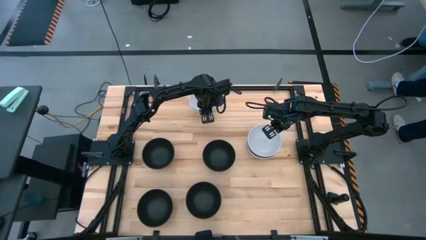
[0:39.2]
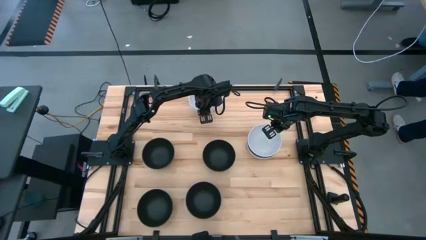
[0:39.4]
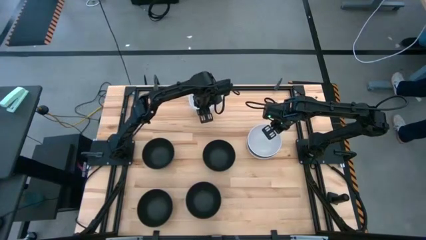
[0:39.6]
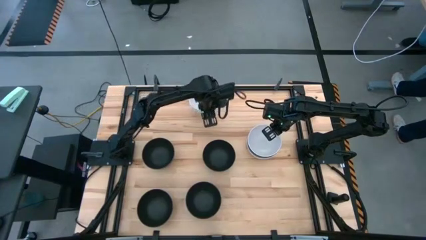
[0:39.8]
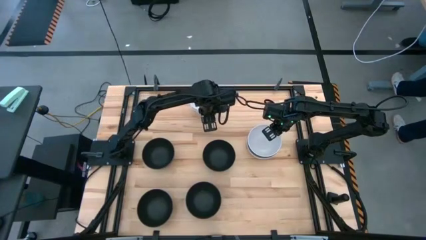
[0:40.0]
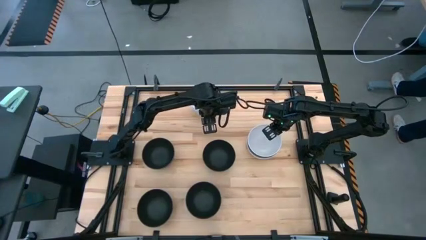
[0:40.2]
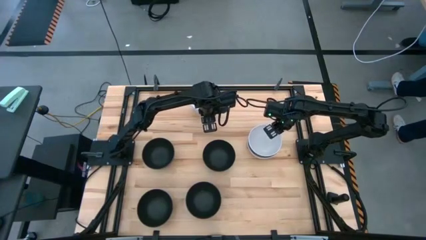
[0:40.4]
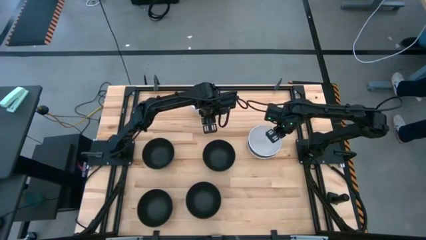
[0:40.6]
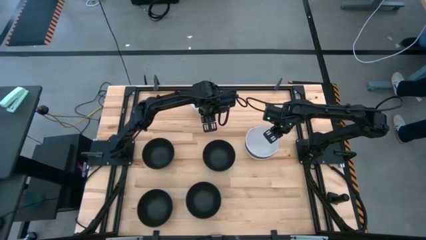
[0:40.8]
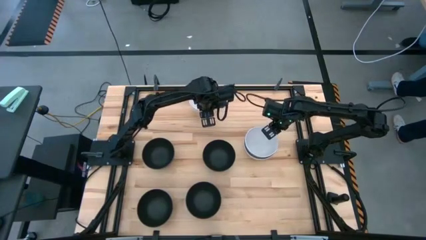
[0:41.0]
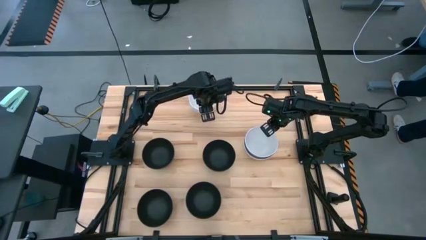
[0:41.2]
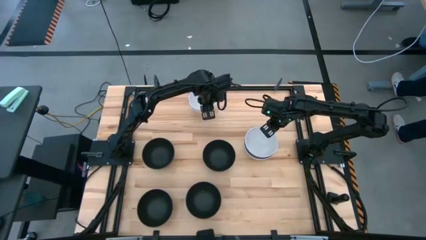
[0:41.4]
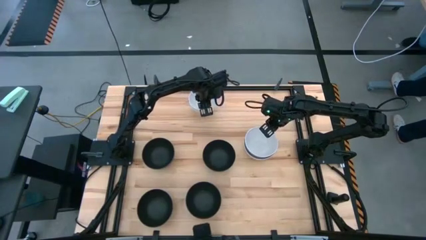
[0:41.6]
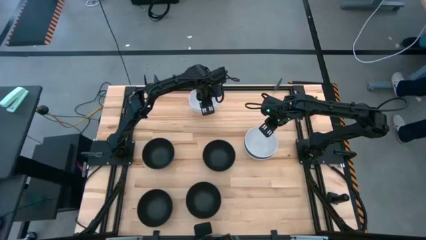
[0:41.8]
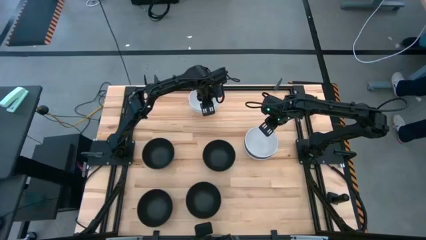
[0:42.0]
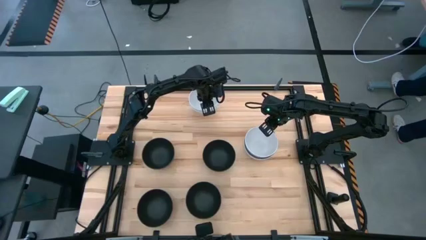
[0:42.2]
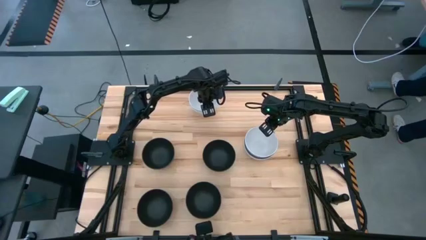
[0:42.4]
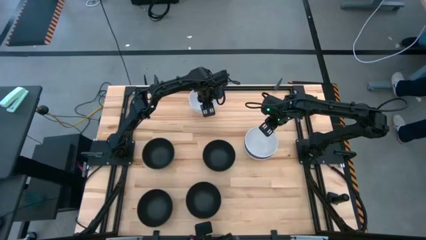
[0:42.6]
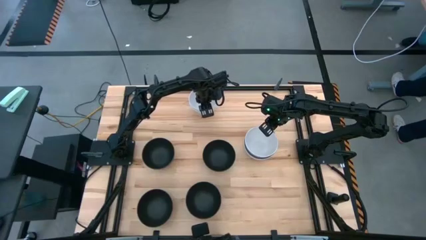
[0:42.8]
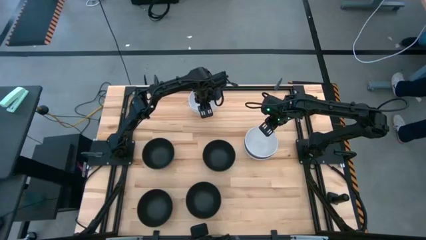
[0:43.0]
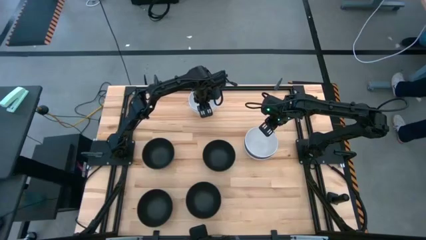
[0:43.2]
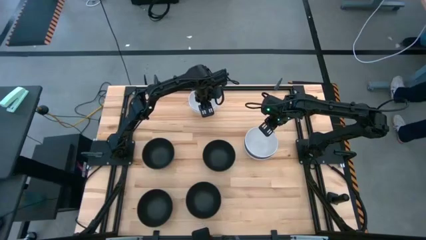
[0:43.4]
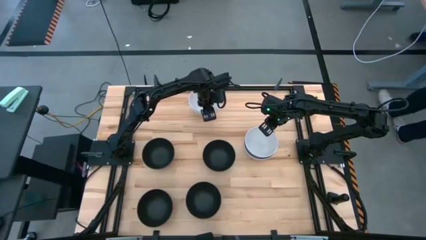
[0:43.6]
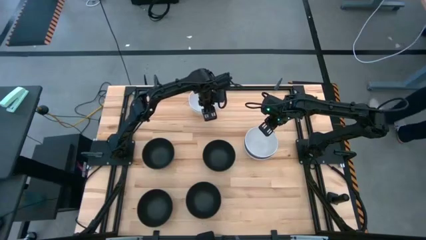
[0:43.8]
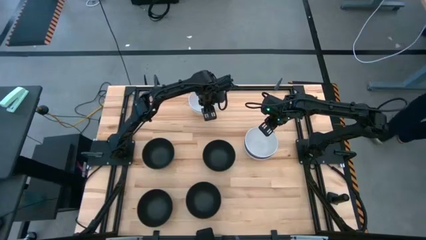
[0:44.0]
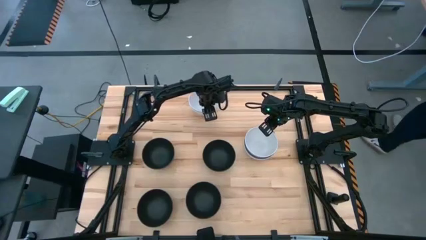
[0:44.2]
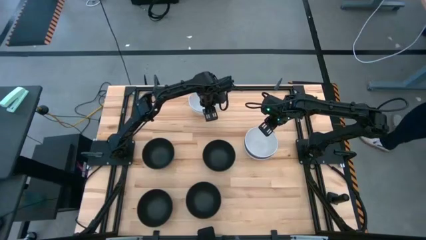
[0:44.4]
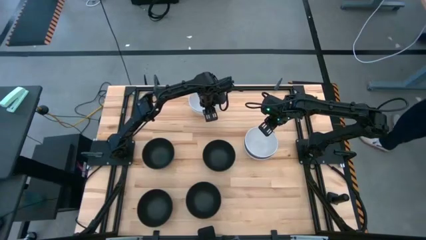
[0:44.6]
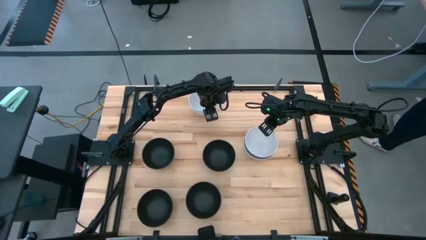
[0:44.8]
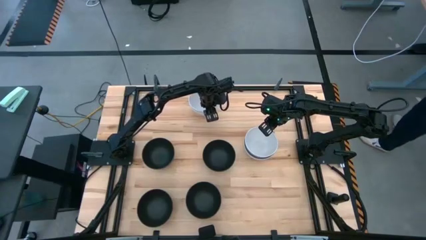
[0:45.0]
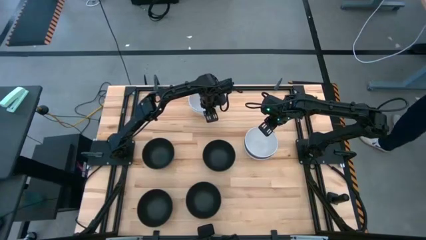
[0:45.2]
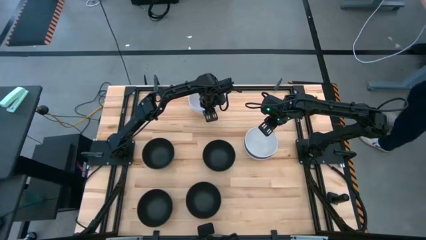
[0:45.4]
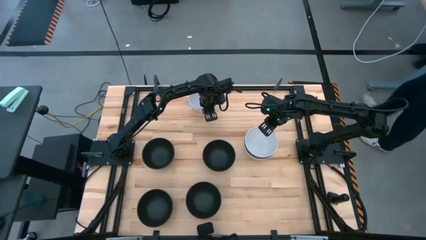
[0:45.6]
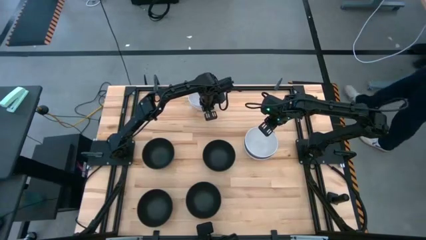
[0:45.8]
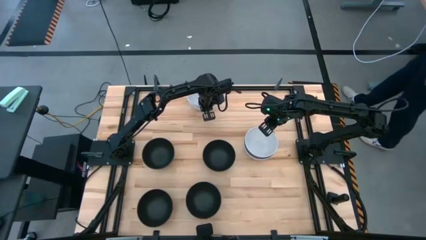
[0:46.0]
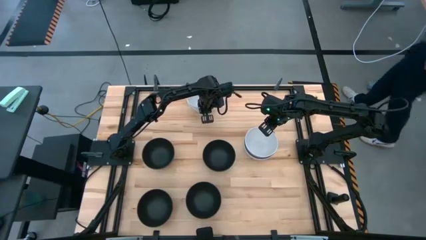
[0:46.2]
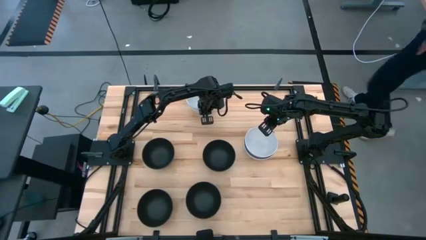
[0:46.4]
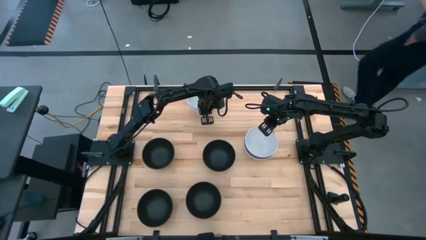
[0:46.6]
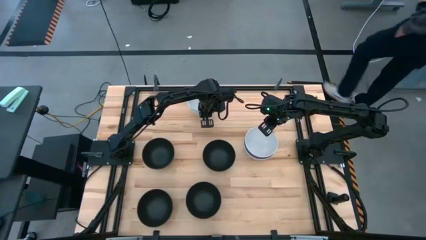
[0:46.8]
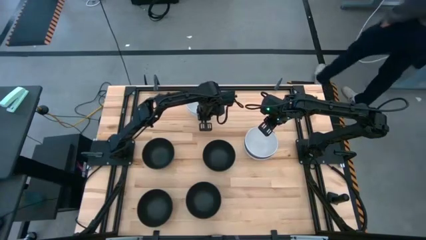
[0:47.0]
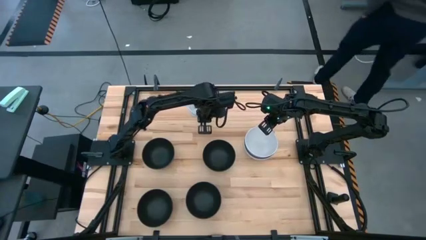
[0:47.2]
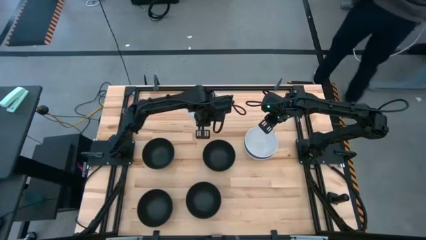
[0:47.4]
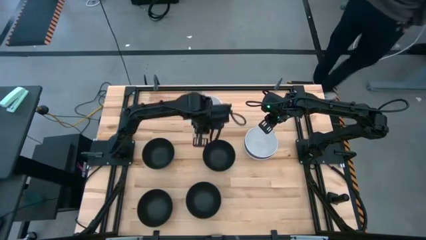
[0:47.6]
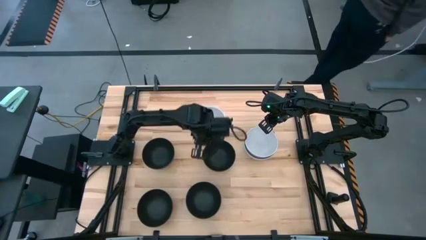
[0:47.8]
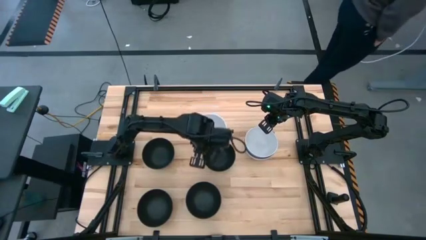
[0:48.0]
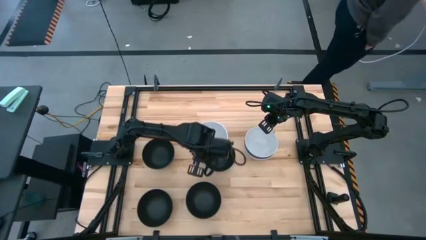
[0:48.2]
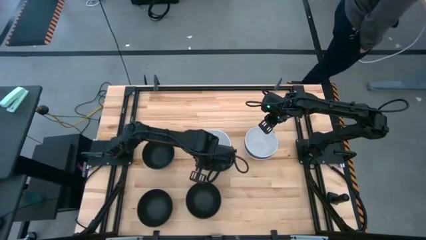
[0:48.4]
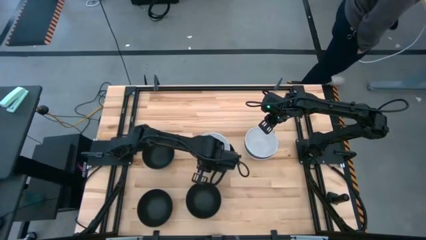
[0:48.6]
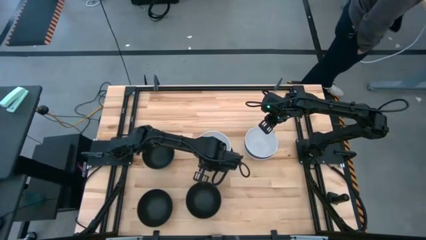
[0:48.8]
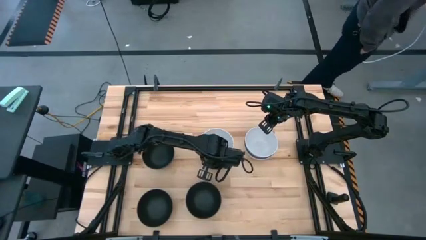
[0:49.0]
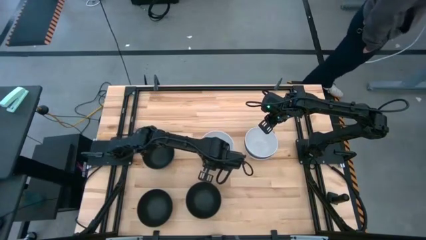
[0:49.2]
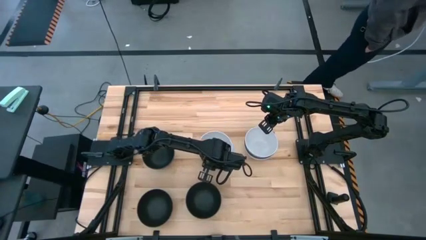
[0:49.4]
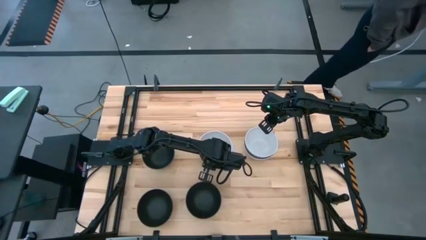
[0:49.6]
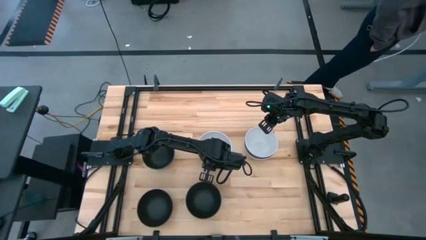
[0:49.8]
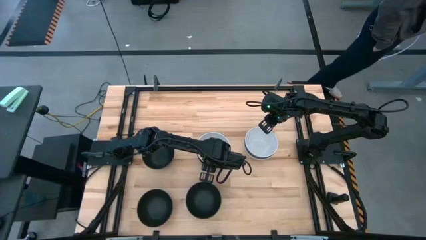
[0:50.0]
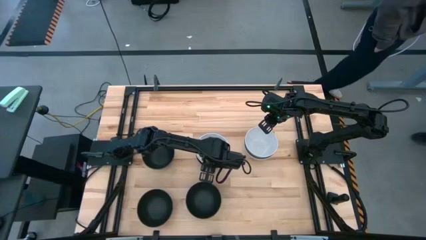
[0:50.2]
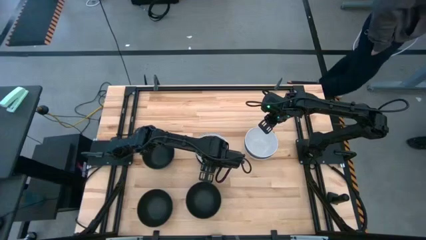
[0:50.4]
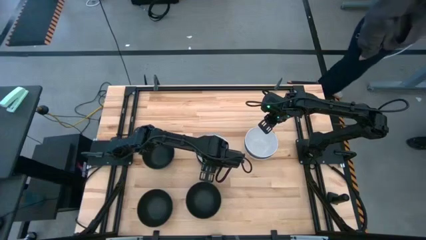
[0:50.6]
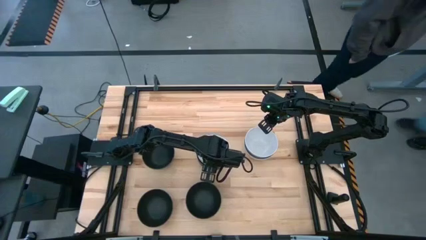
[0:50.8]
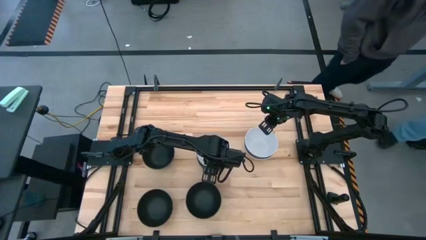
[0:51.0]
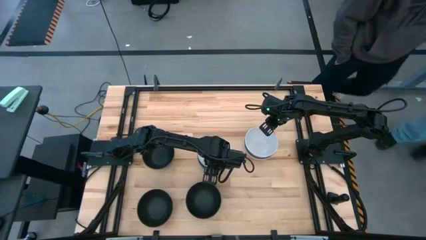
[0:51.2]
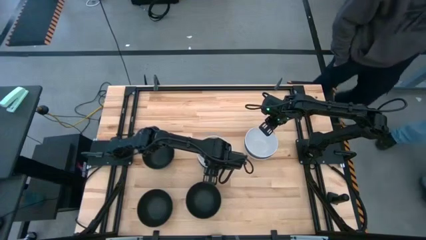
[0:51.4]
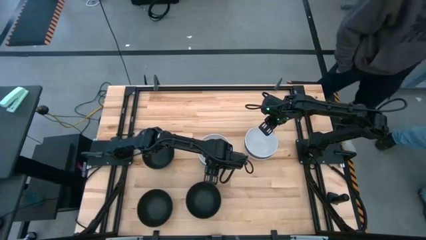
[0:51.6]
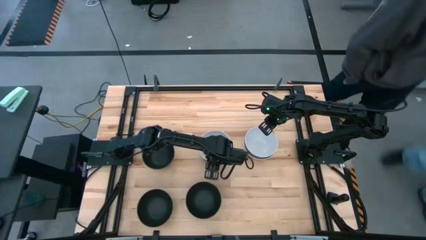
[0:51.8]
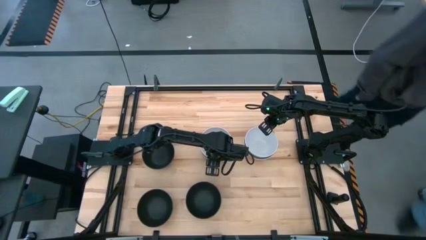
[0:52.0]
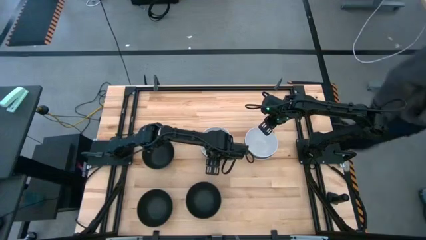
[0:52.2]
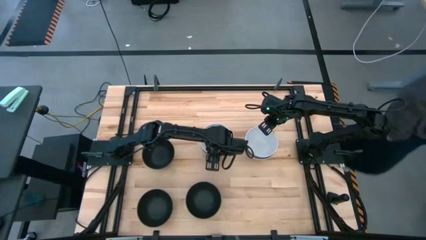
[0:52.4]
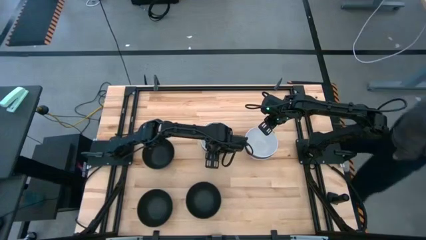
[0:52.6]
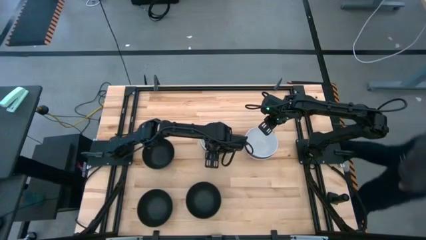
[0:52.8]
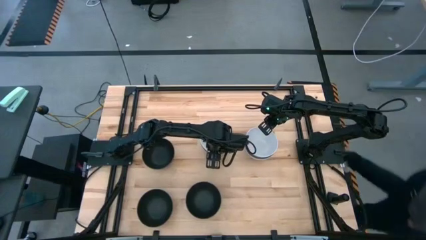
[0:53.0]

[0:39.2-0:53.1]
Task: Nest bowls inside each other
Stack the stacked white bowls on top of the black bowl
